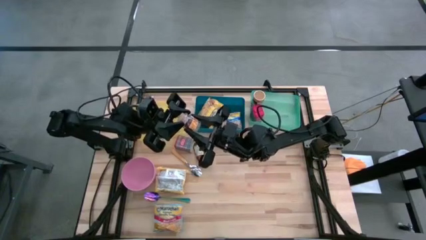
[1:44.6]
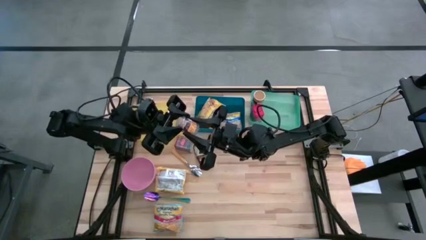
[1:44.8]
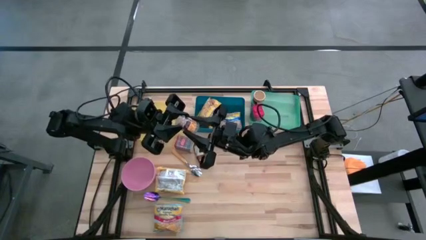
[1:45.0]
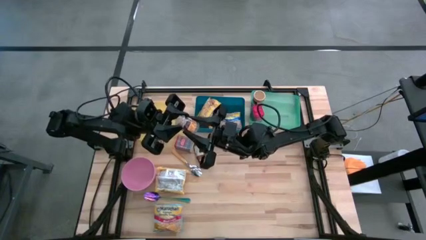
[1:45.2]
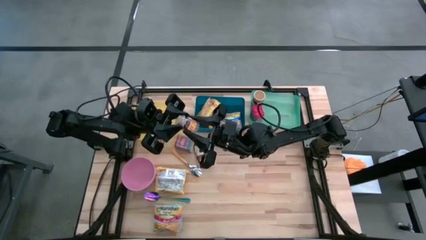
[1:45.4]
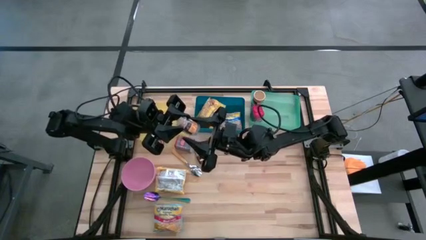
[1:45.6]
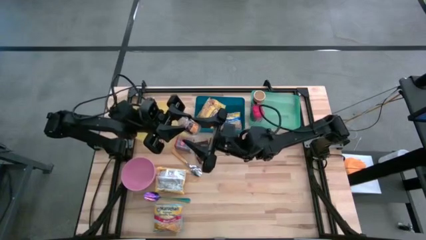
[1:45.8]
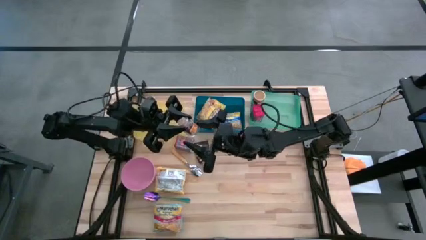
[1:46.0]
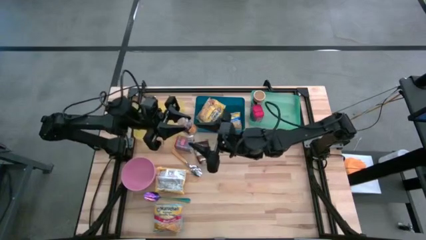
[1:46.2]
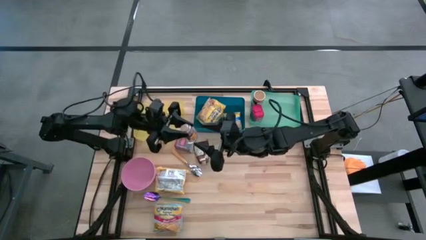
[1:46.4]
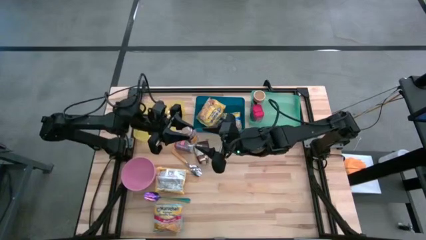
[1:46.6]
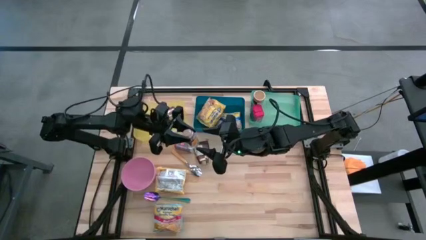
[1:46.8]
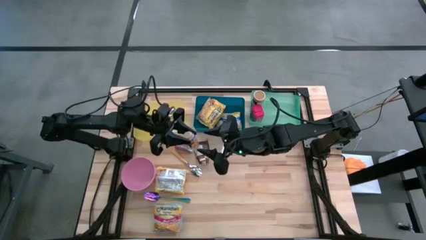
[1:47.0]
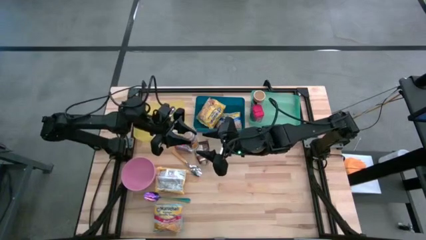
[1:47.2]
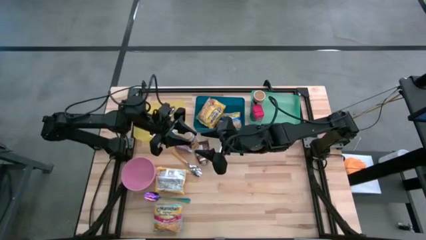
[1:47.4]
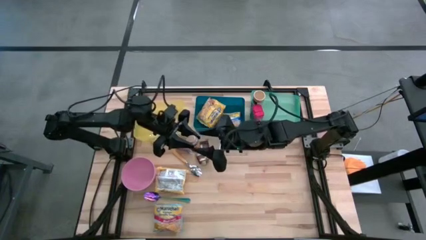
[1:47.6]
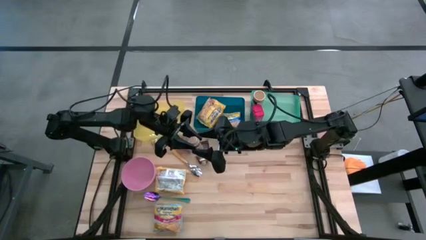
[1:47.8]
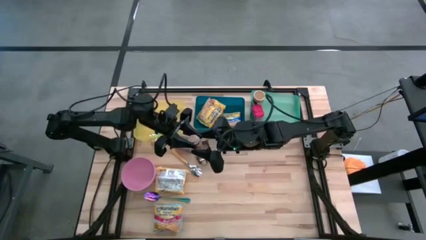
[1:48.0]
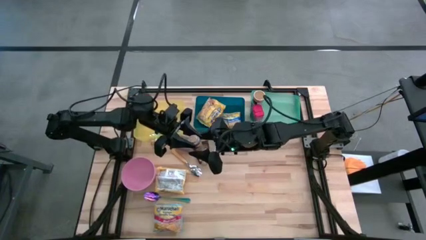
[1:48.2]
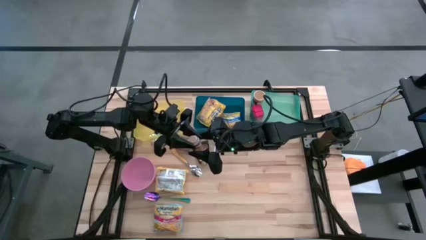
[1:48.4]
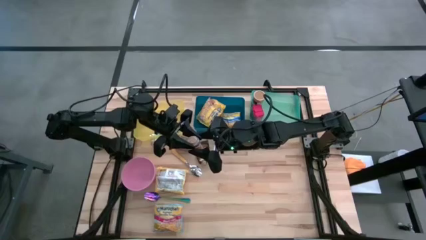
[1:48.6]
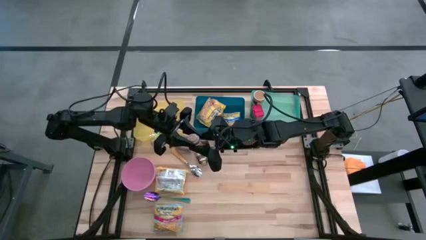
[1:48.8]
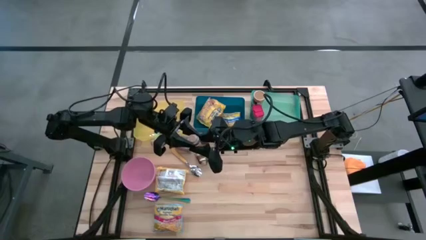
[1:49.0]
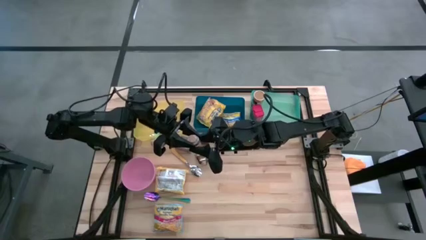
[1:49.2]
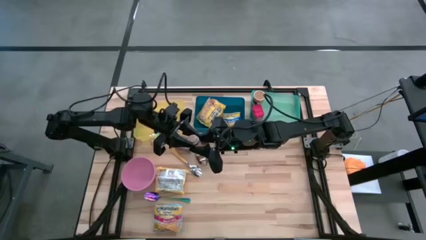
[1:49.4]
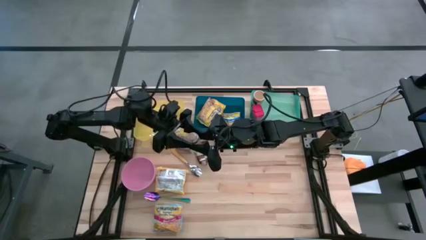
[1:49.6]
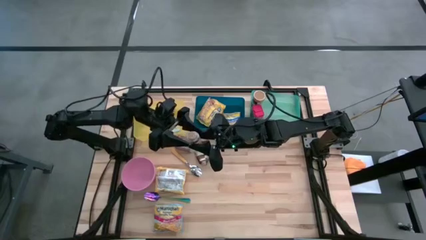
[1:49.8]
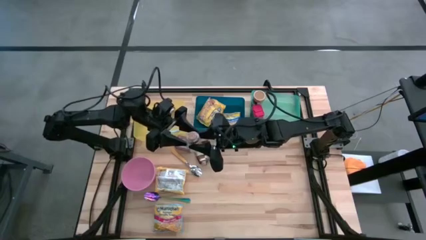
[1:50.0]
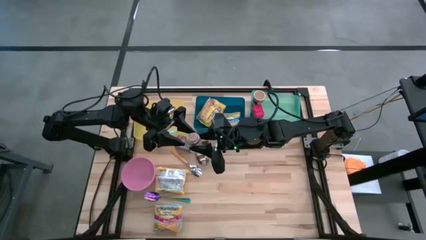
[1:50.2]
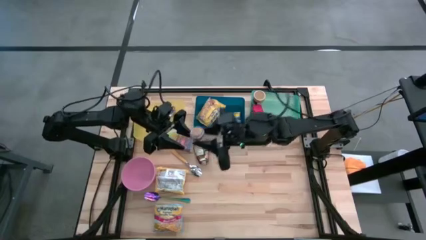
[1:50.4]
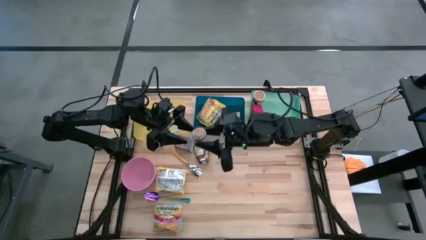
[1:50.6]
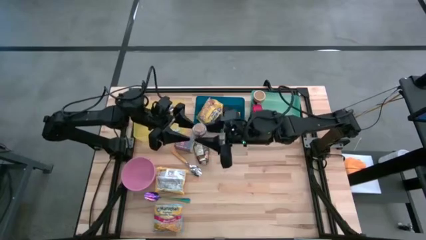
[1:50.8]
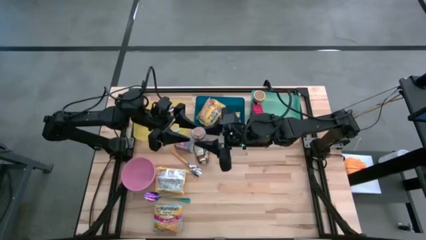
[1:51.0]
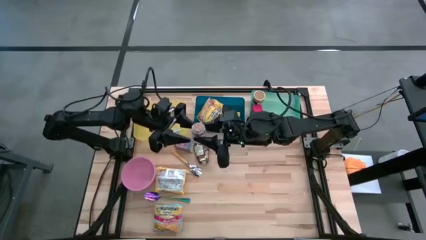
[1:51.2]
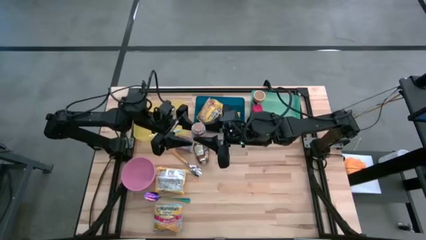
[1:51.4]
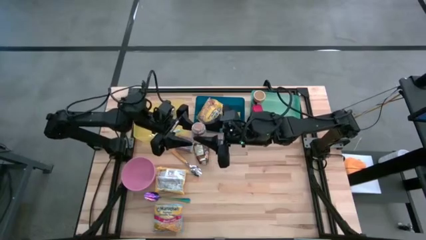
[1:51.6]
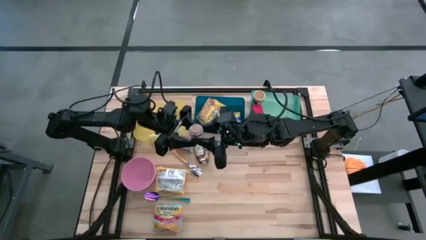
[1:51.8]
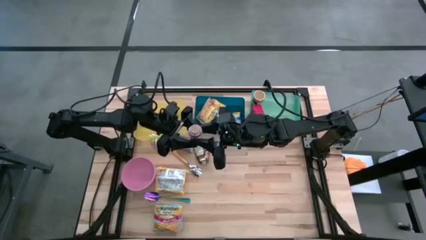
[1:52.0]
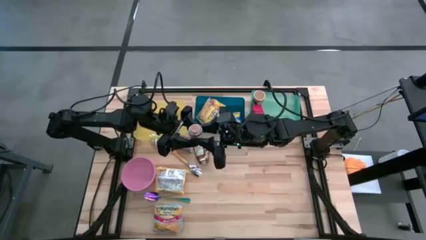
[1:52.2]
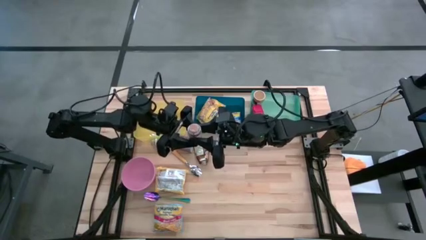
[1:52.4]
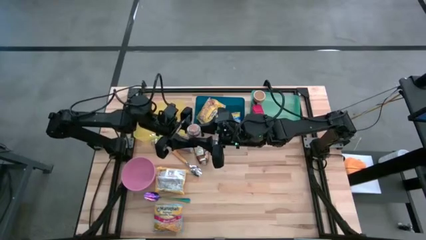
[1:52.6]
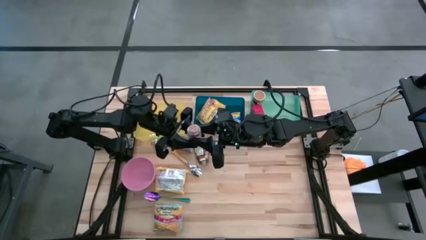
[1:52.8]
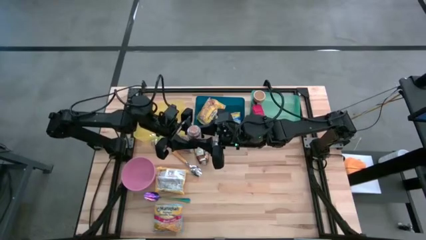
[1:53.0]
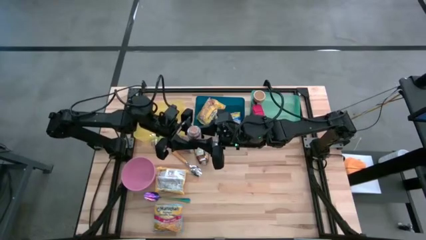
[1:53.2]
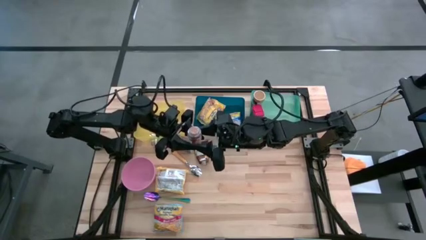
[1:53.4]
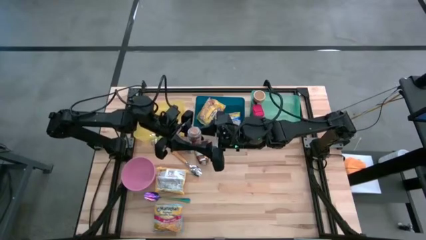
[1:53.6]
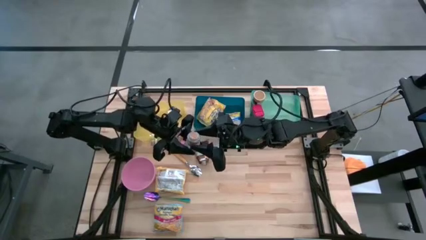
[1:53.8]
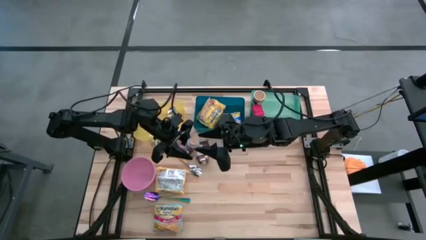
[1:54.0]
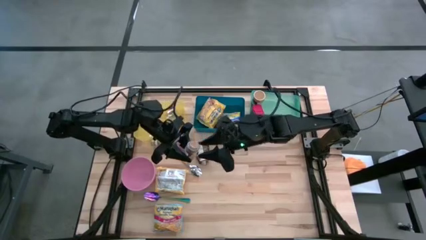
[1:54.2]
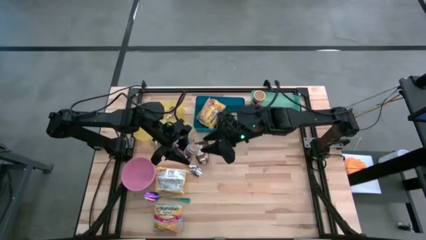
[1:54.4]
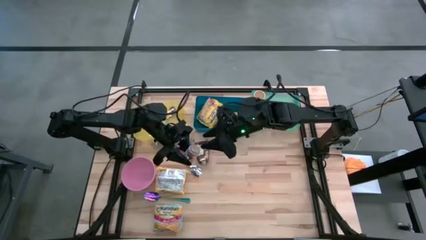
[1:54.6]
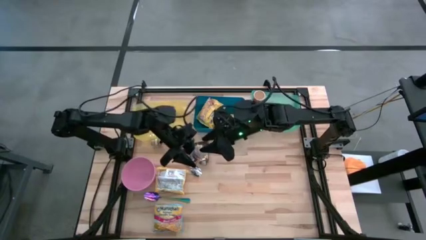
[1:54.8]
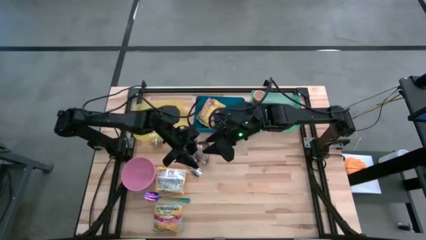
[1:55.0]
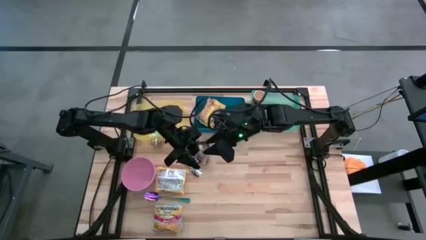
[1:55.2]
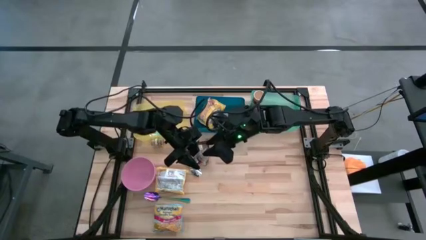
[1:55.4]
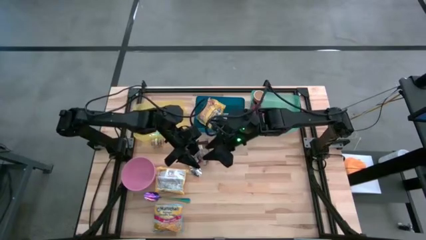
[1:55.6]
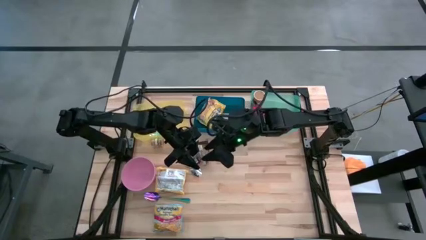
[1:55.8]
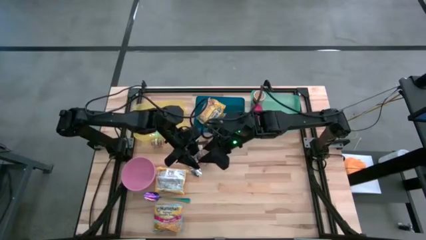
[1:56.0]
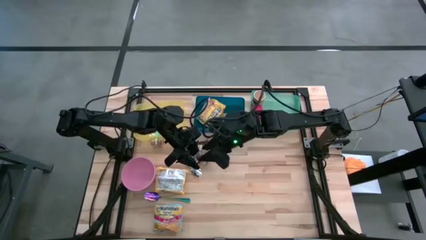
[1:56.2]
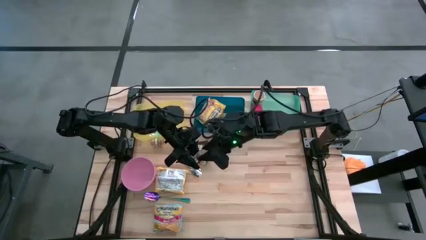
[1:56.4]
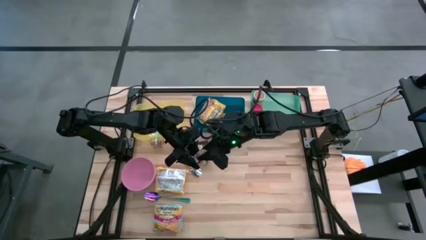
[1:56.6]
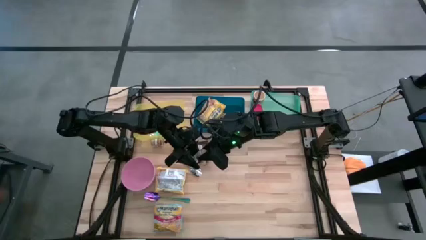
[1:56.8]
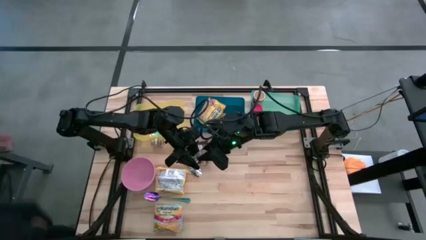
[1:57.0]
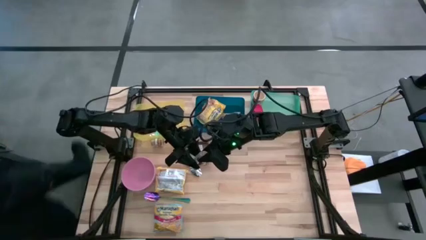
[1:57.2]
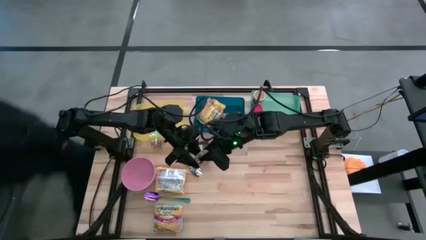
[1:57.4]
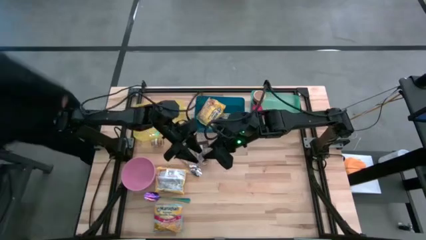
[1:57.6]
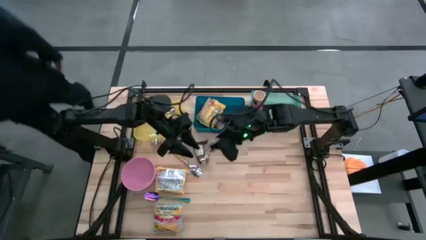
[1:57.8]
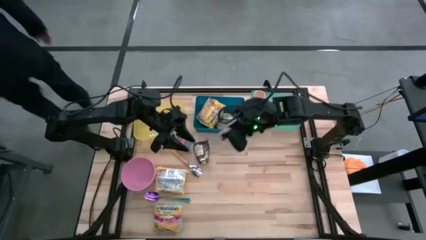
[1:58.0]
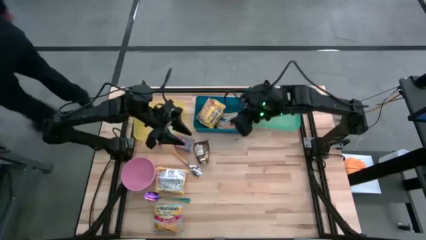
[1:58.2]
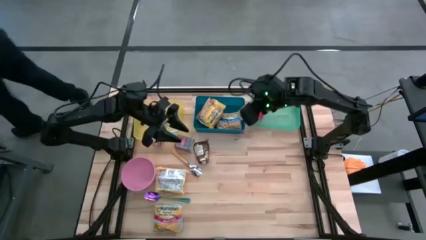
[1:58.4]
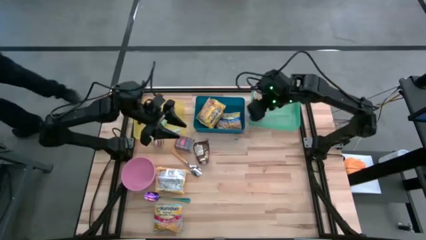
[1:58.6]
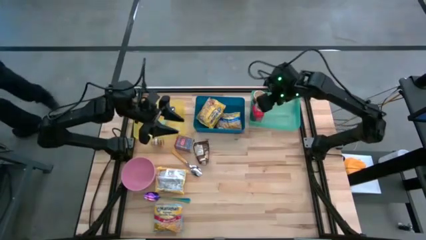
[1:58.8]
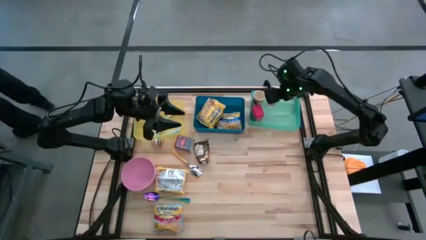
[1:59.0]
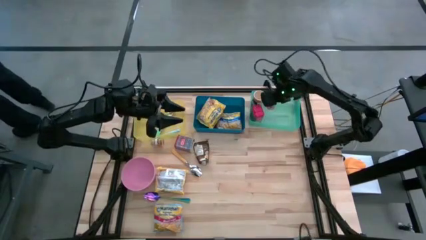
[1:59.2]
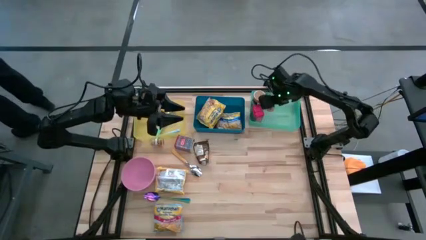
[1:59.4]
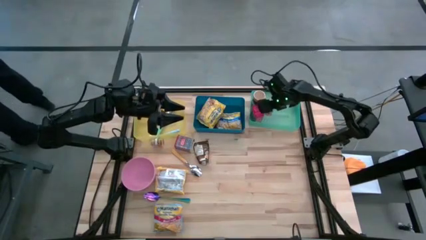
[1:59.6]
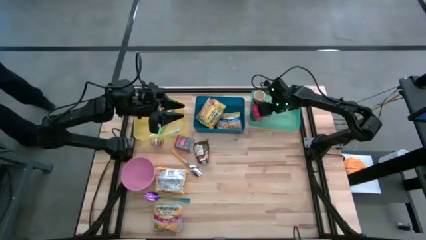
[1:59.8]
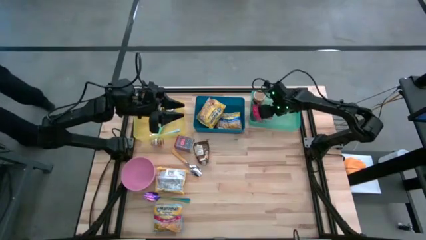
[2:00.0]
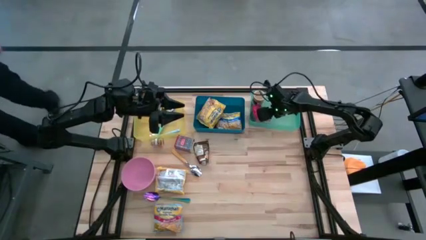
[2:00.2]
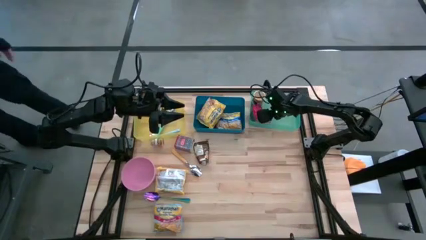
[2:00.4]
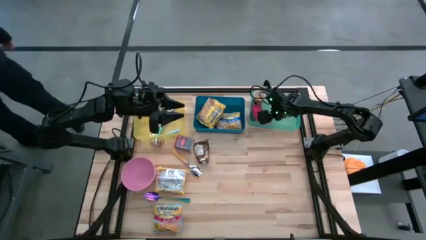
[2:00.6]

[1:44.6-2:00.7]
Put the bottom brown seasoning bottle into the light green bin
